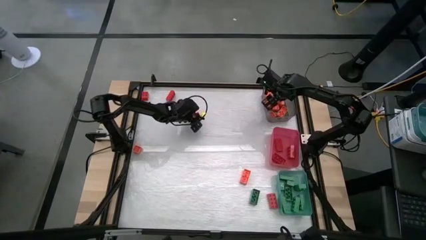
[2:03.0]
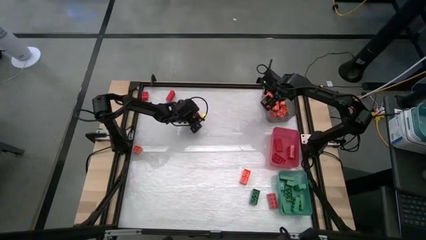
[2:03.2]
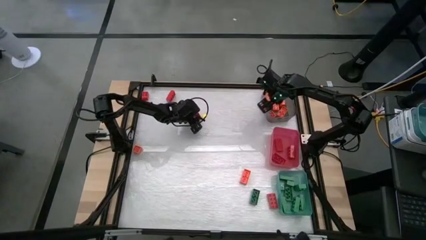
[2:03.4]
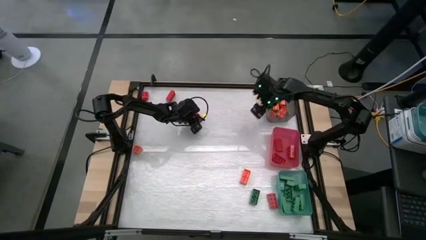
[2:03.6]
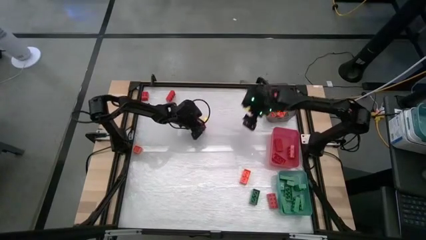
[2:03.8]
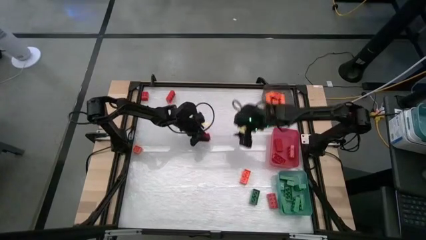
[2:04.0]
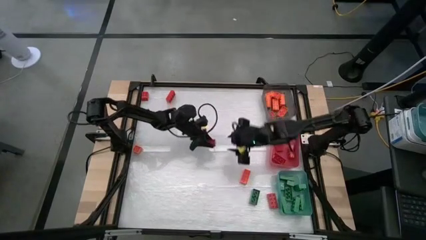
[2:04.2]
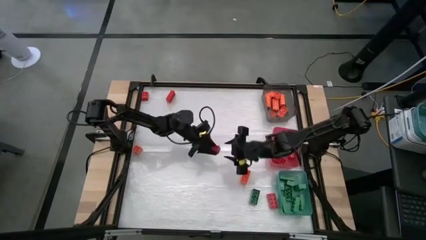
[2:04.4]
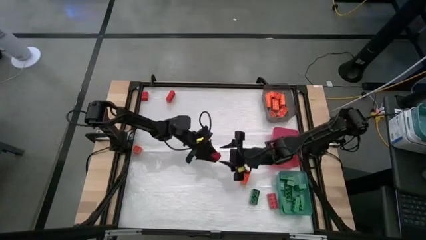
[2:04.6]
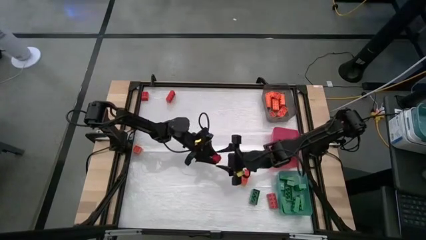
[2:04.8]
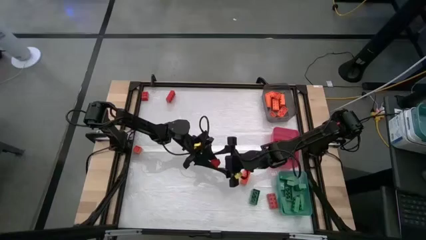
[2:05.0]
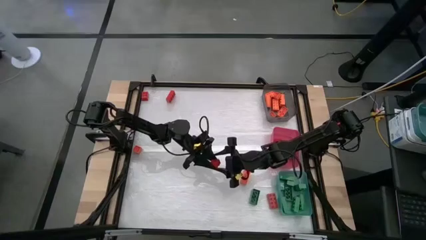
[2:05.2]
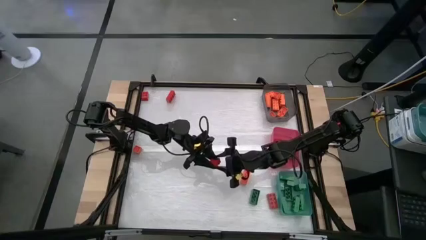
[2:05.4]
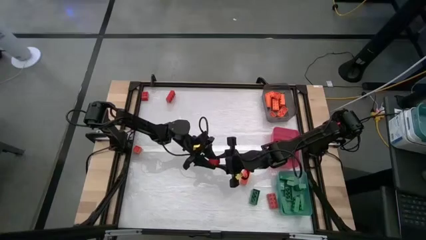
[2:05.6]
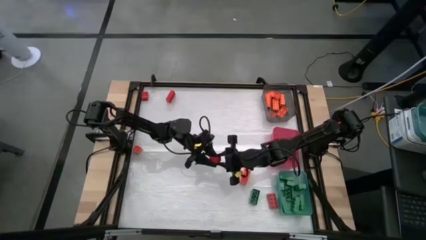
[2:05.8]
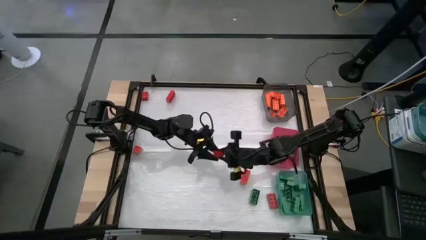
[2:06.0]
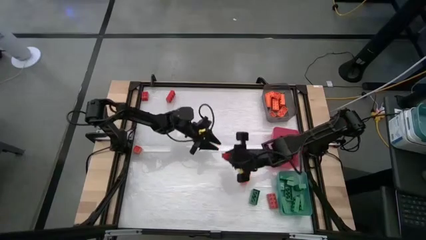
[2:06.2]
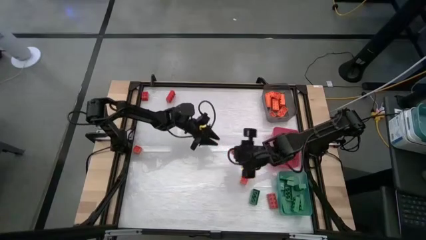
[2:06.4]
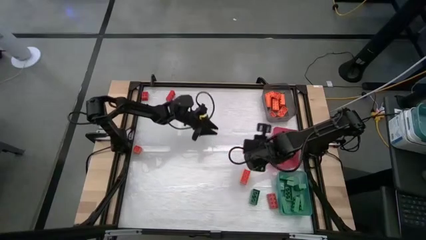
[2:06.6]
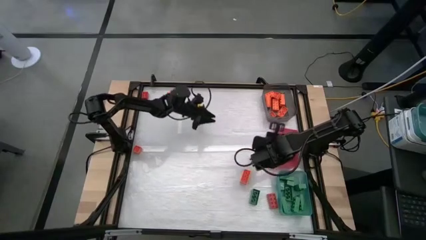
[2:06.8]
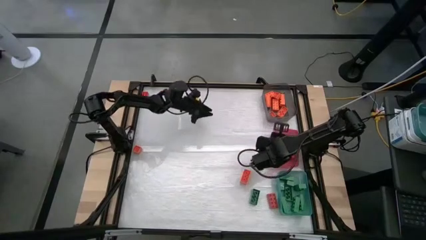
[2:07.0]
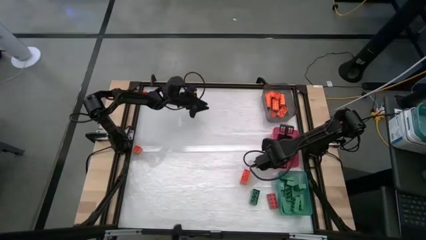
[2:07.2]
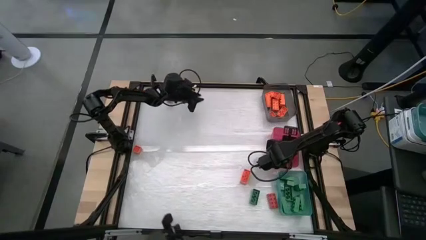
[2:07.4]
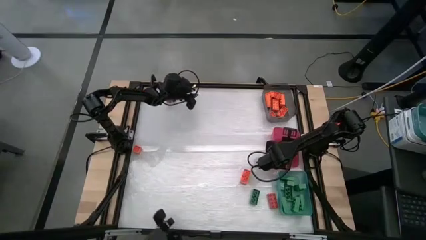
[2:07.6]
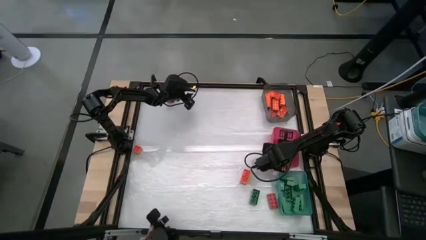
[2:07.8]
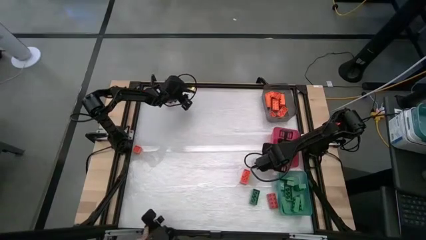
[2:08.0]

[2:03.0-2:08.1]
Task: Sort blocks
Put the red game piece into the red bin

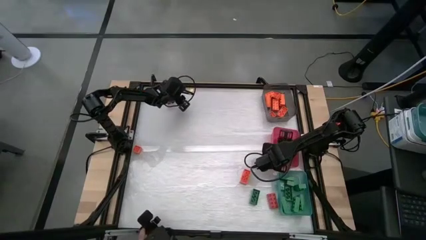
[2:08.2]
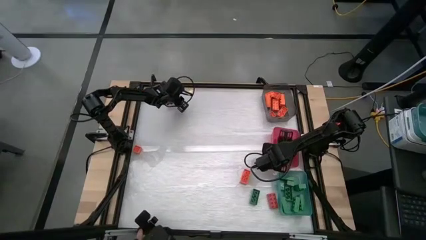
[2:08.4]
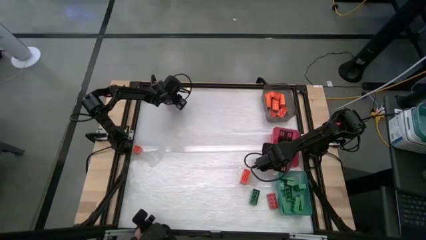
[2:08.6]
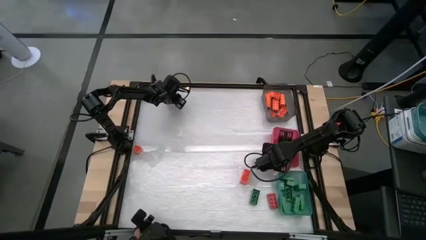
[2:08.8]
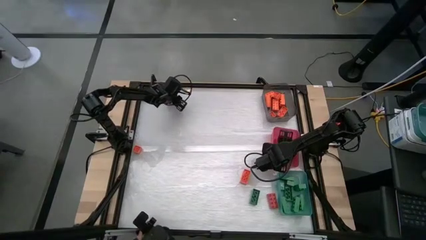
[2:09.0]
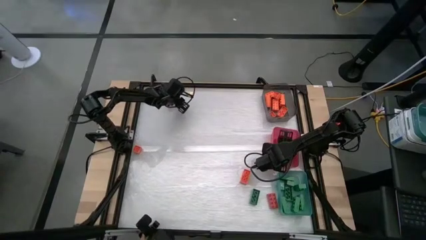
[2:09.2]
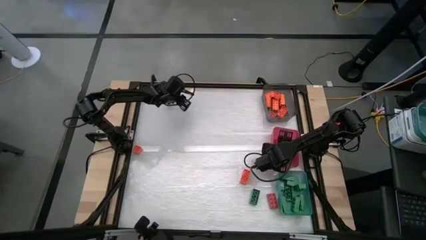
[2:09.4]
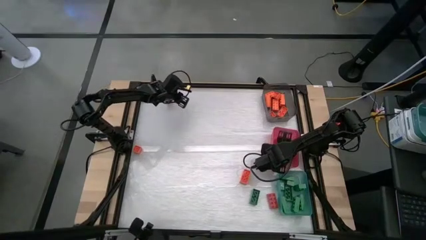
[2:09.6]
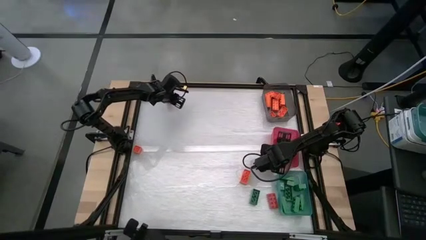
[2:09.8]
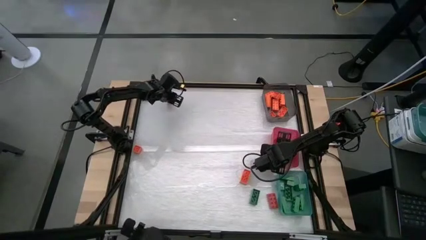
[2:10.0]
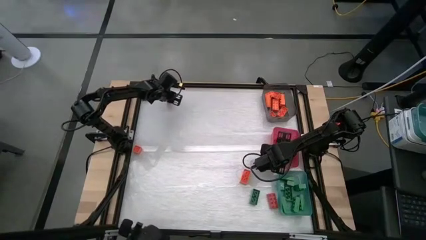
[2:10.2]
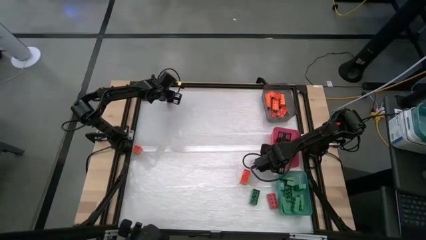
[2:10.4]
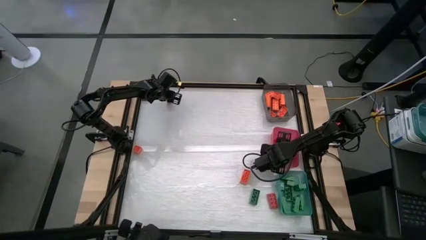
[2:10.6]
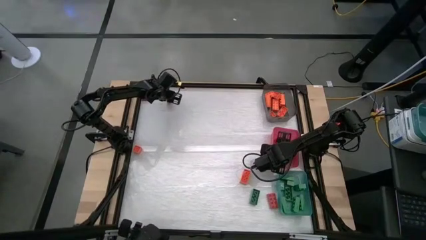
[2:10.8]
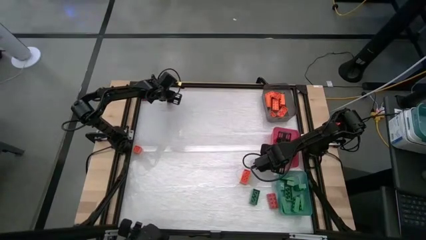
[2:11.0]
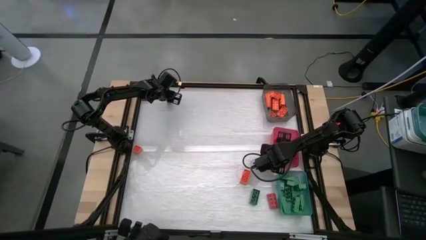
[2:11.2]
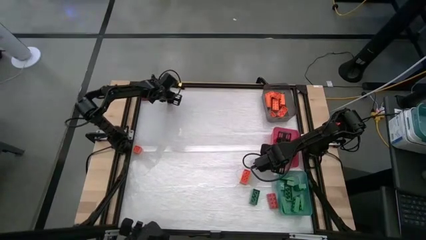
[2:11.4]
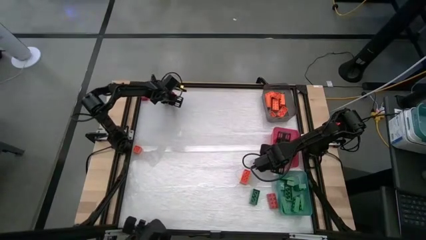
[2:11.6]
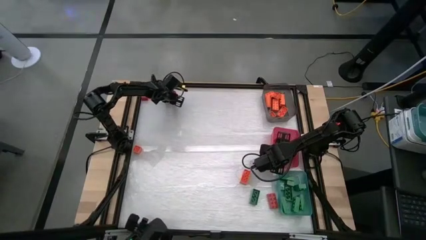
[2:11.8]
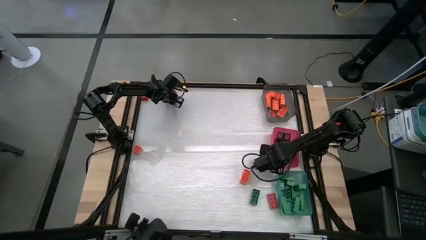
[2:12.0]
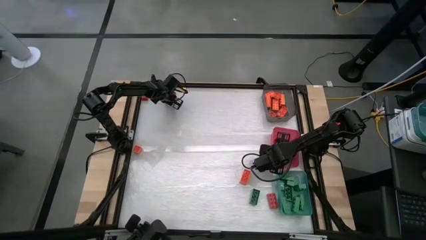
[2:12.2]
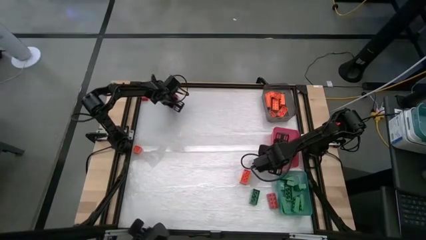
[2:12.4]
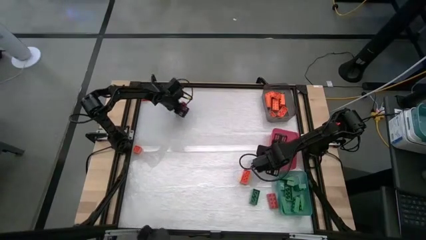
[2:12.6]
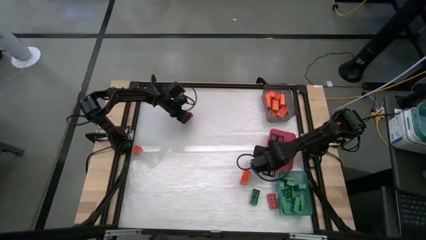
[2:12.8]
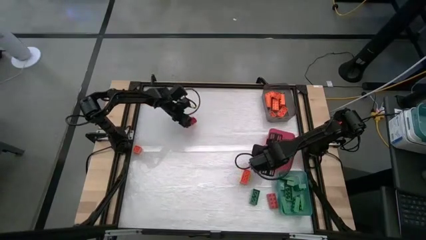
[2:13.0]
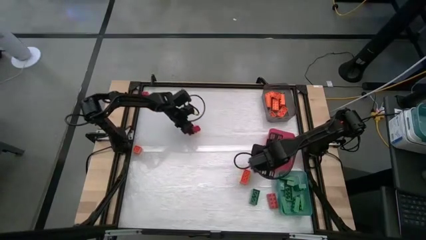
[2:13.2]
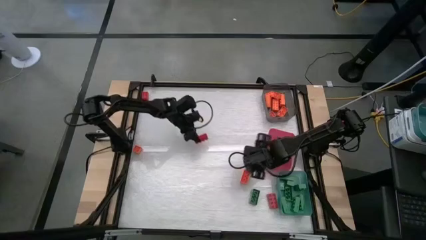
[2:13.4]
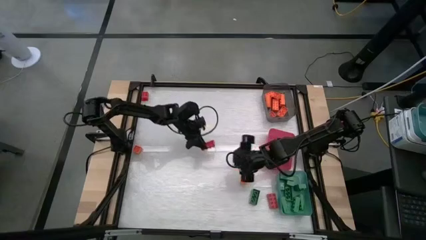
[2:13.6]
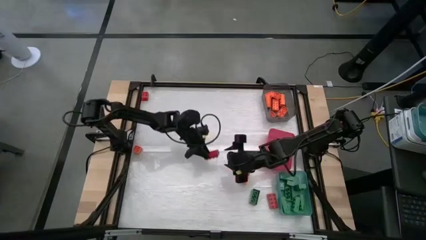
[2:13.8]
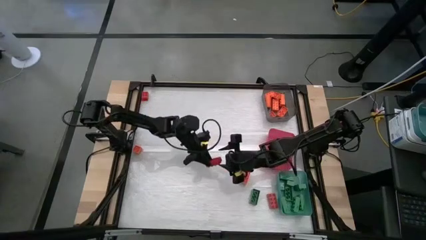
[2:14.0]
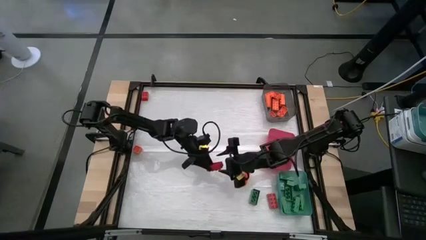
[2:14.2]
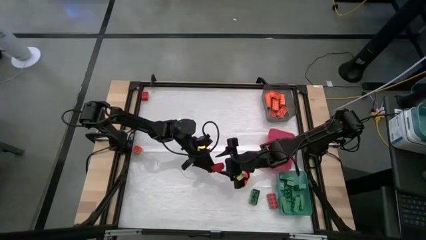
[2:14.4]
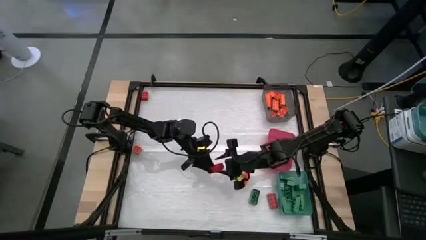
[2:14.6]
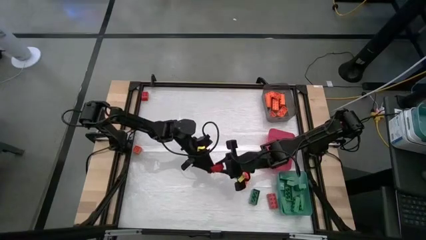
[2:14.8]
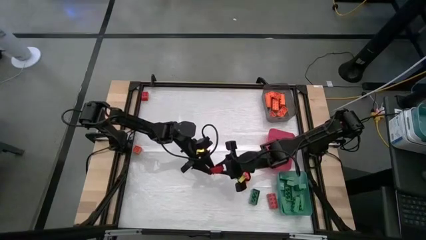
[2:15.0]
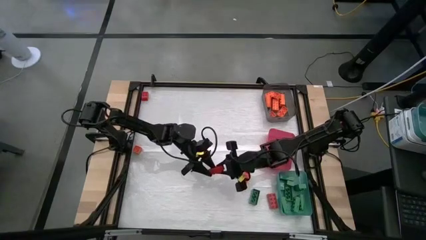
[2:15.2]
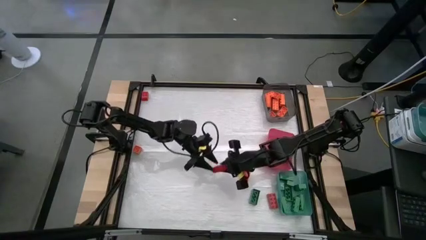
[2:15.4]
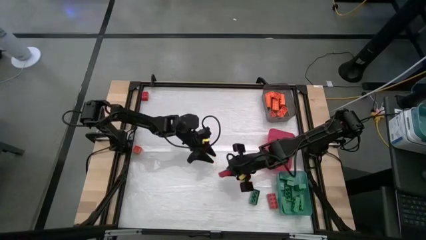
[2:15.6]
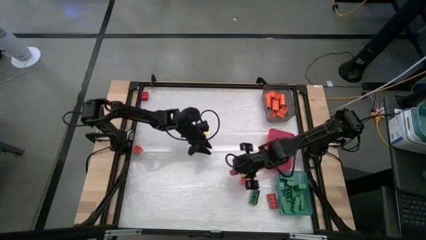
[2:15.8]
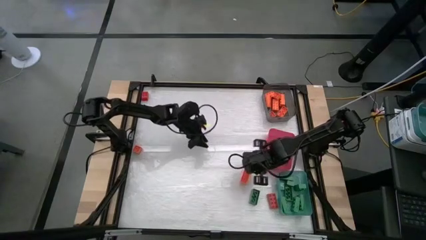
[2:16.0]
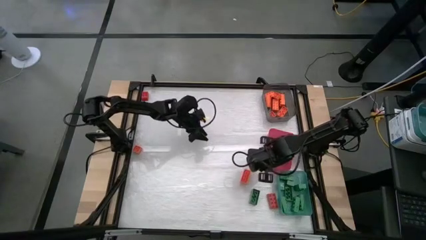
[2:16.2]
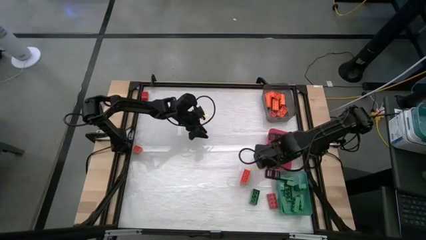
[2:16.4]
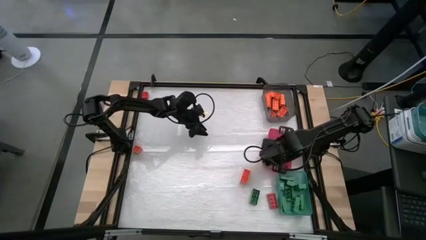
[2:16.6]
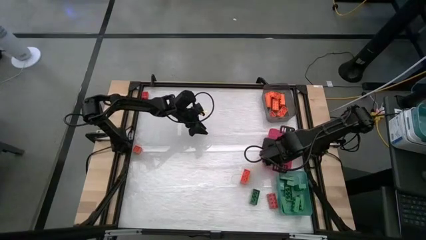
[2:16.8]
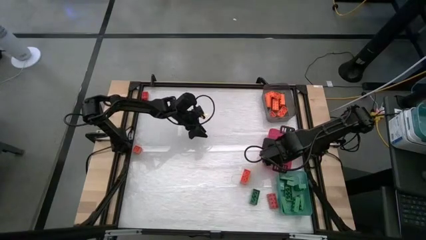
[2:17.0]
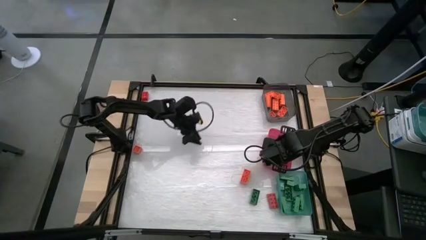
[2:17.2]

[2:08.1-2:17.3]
Put the red game piece into the red bin

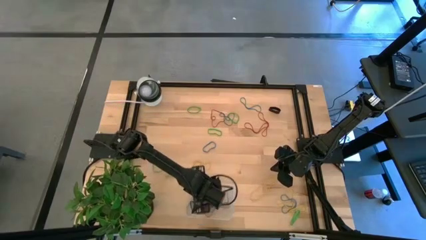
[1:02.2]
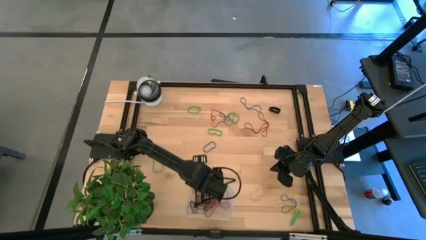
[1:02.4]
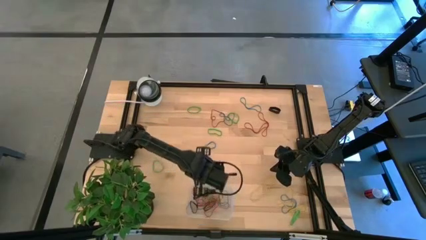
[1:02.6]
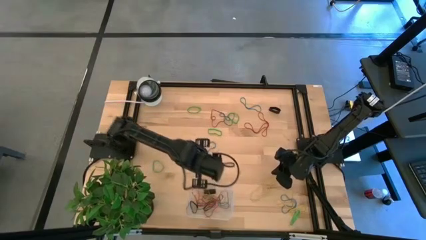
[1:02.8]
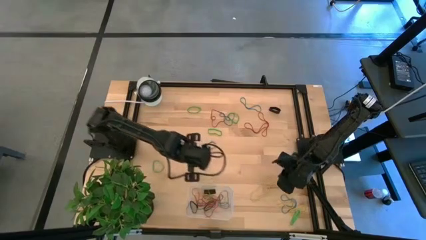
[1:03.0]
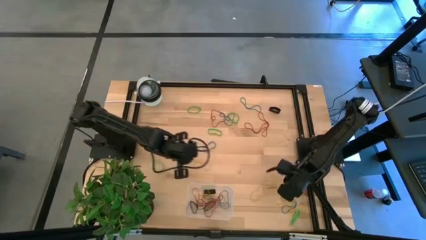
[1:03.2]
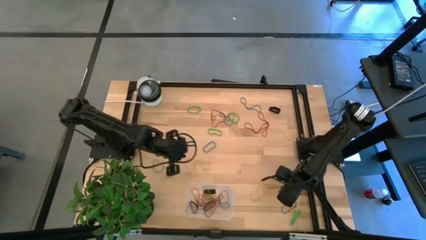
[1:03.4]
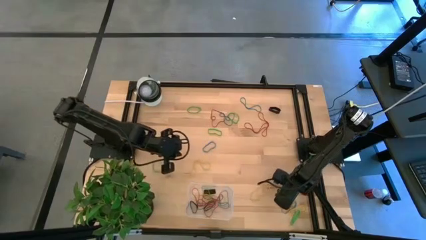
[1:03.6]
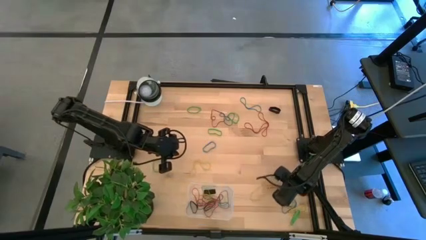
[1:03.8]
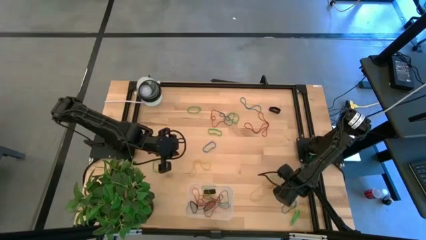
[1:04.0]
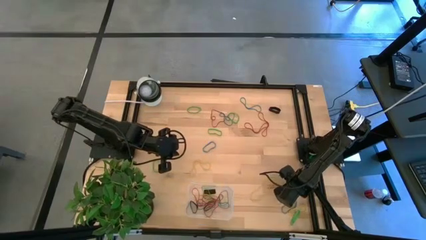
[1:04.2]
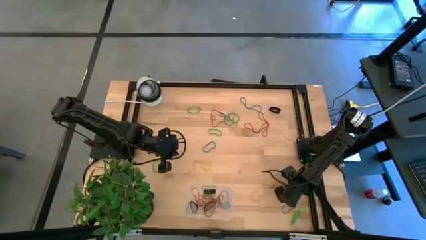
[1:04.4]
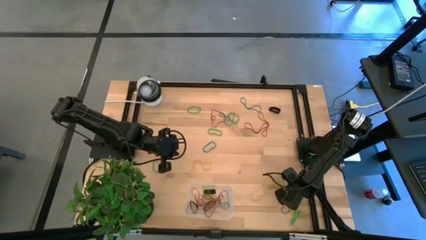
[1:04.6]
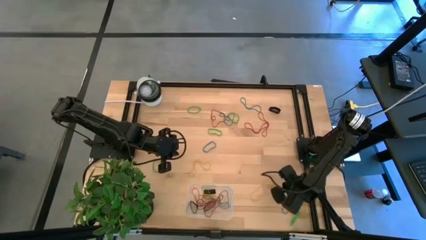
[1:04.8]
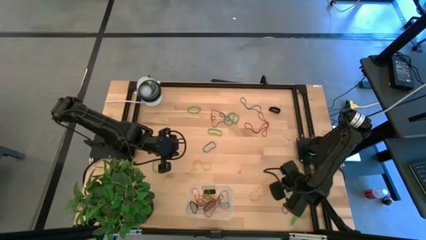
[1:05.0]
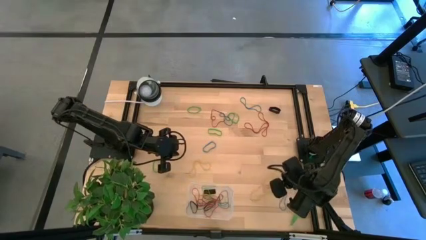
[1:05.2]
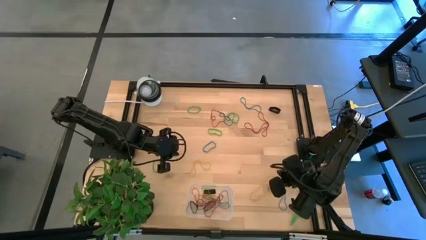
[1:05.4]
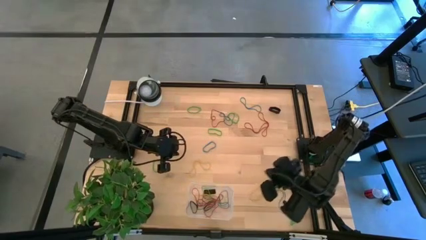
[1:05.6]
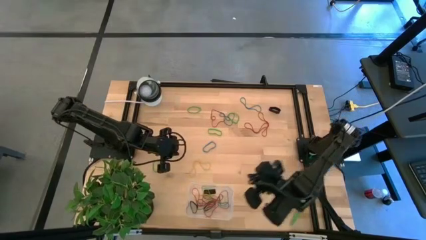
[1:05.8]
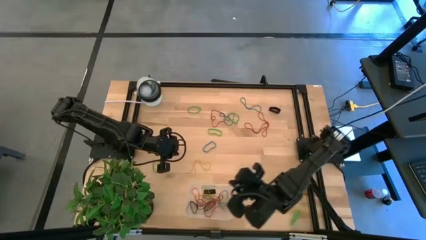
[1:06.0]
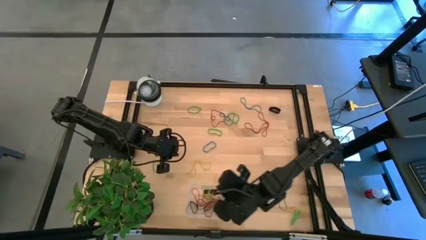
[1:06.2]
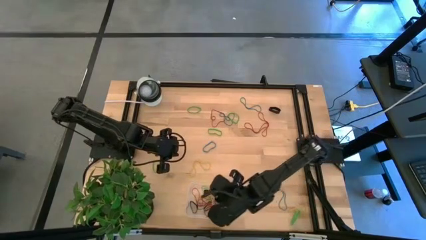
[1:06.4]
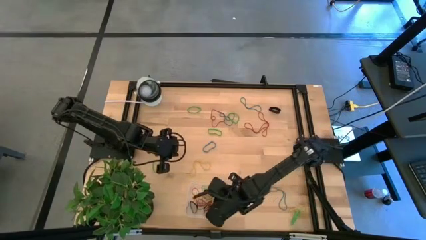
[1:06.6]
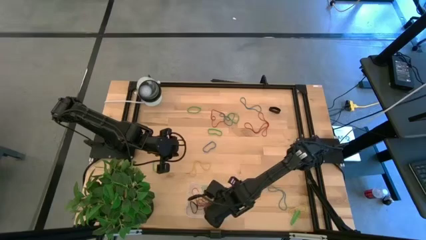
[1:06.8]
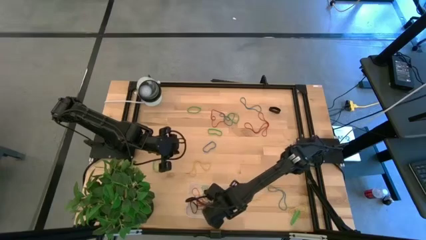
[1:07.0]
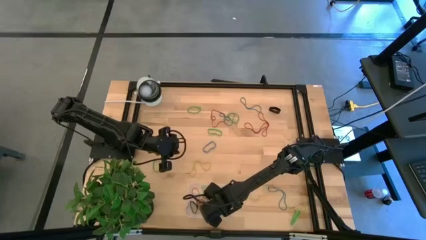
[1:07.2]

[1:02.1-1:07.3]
Task: Pick and place rubber bands into bin
Put the yellow rubber band into the transparent bin
